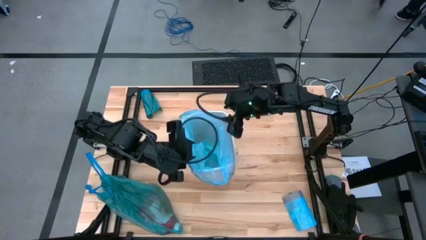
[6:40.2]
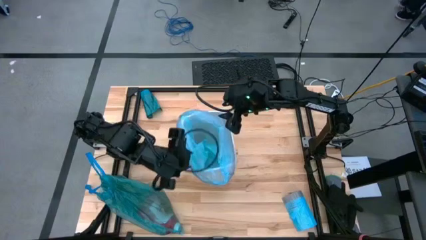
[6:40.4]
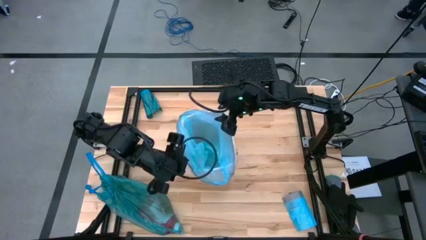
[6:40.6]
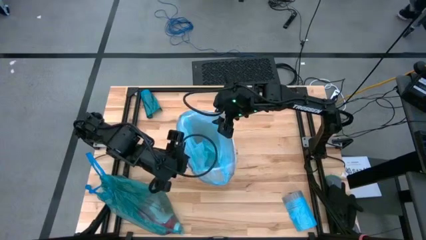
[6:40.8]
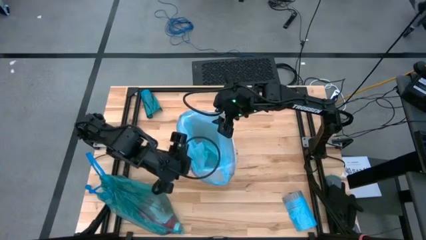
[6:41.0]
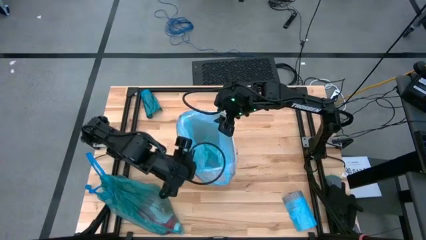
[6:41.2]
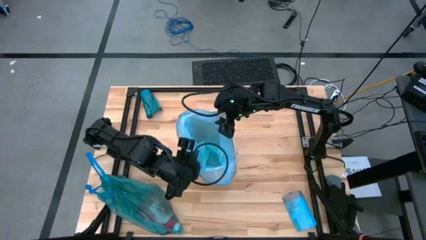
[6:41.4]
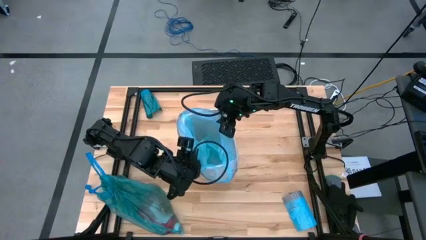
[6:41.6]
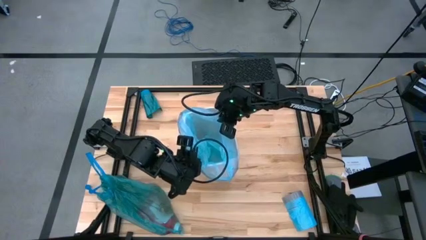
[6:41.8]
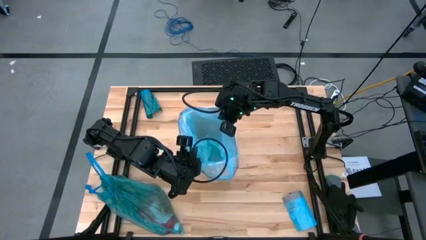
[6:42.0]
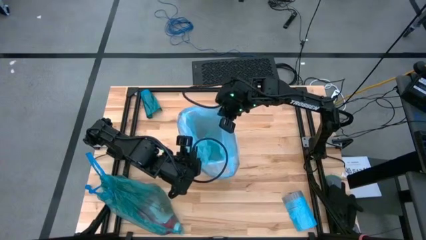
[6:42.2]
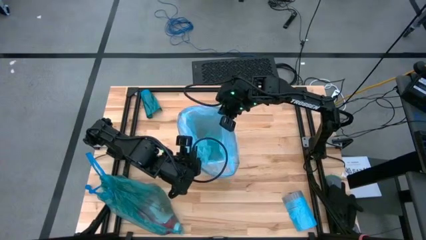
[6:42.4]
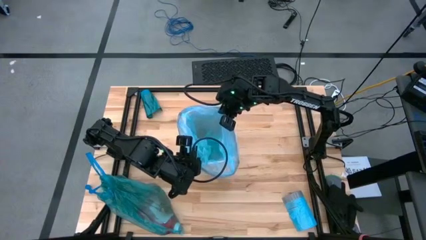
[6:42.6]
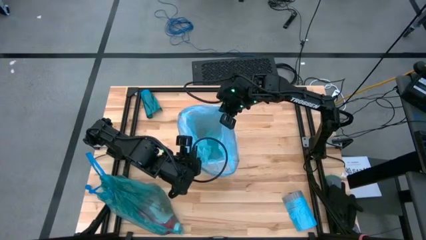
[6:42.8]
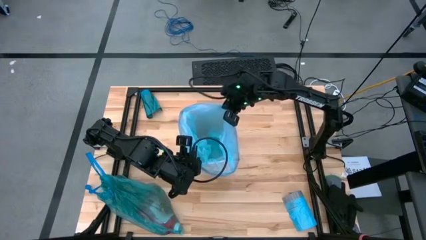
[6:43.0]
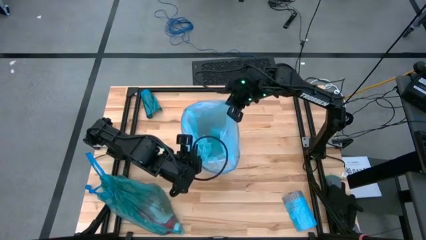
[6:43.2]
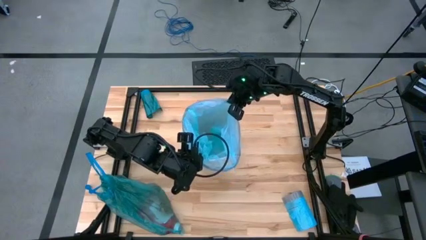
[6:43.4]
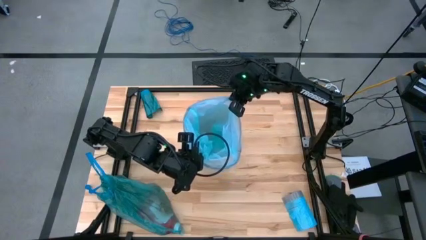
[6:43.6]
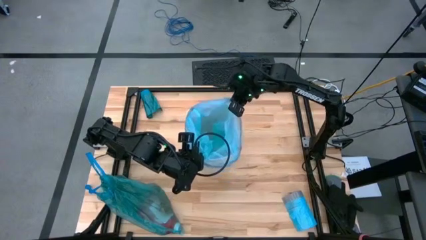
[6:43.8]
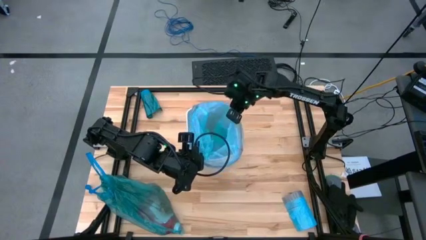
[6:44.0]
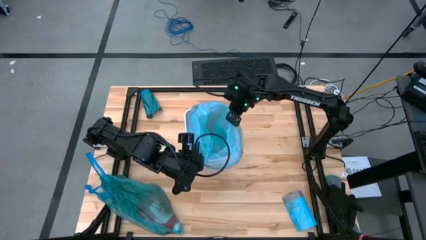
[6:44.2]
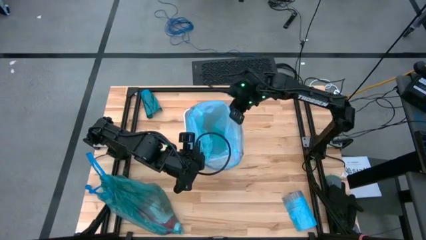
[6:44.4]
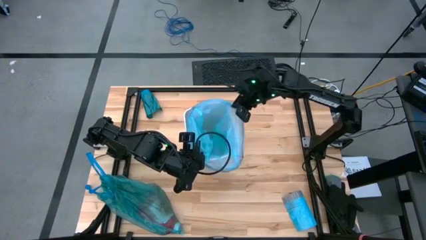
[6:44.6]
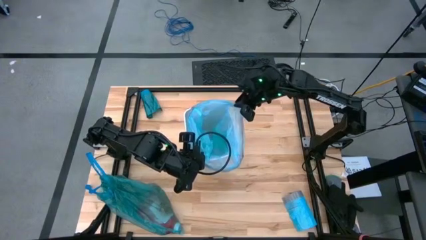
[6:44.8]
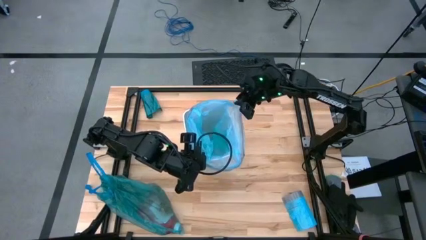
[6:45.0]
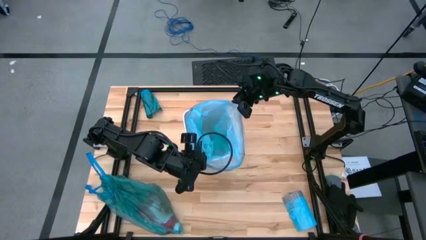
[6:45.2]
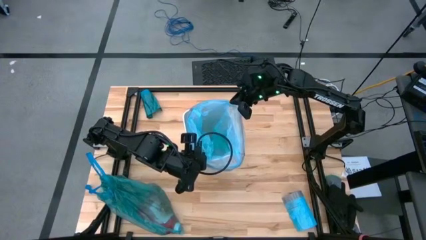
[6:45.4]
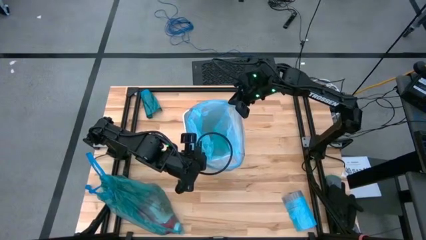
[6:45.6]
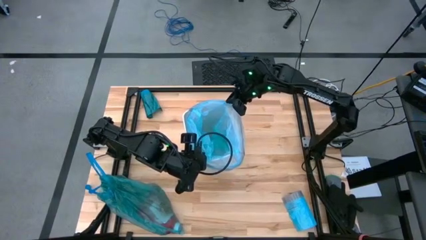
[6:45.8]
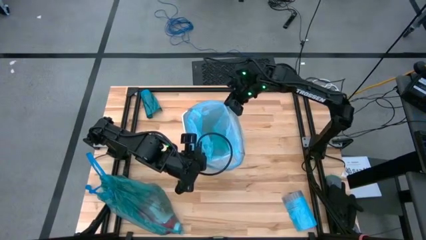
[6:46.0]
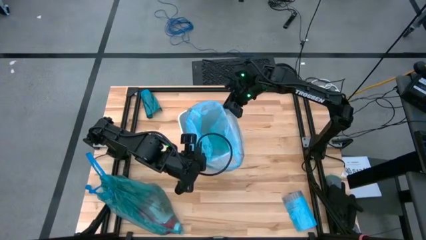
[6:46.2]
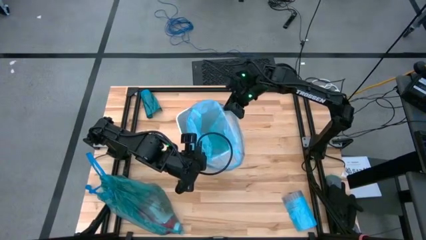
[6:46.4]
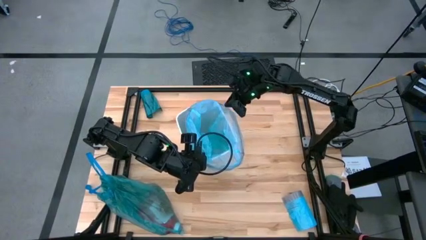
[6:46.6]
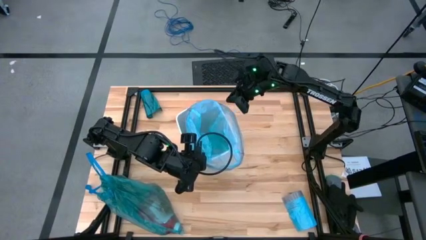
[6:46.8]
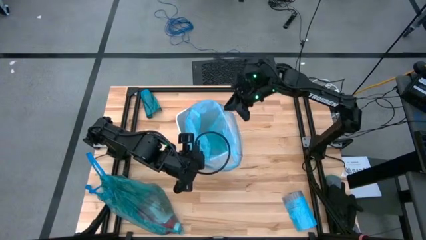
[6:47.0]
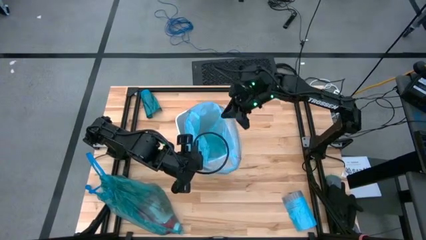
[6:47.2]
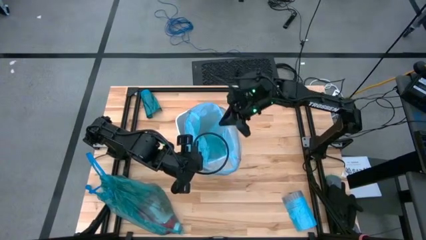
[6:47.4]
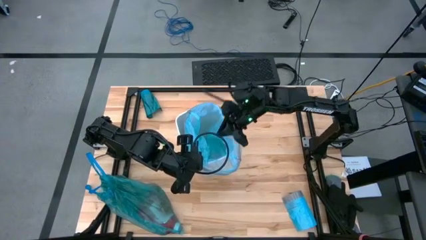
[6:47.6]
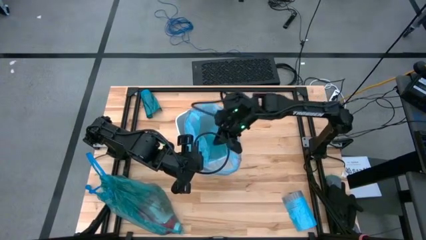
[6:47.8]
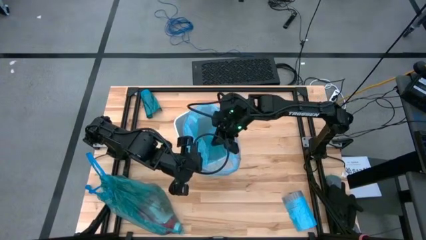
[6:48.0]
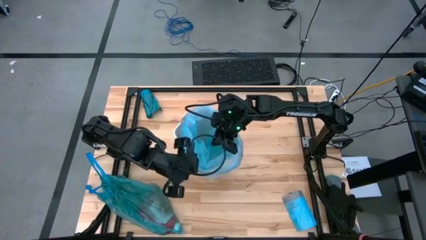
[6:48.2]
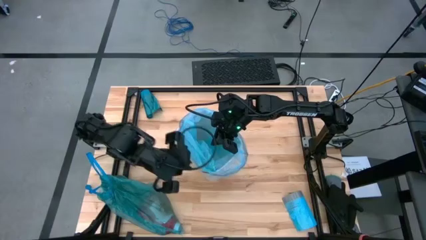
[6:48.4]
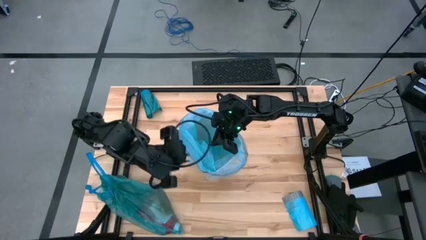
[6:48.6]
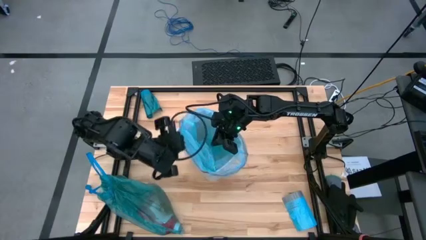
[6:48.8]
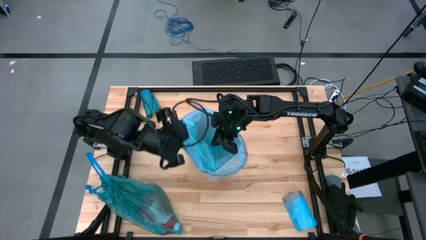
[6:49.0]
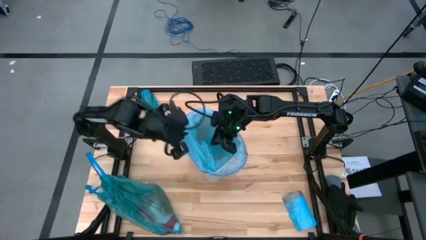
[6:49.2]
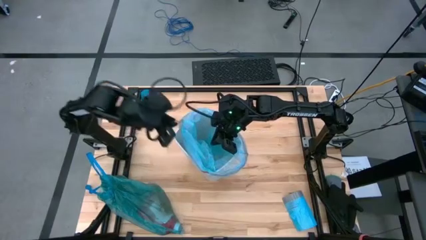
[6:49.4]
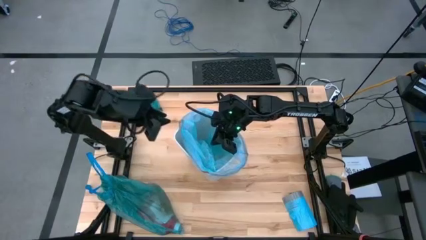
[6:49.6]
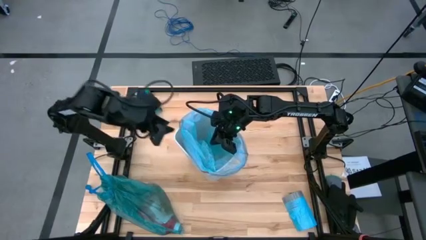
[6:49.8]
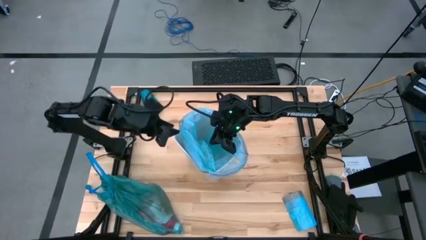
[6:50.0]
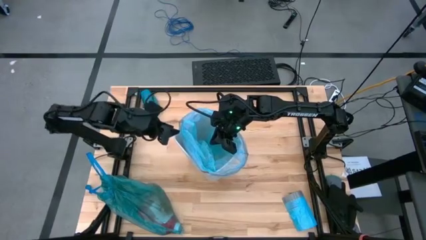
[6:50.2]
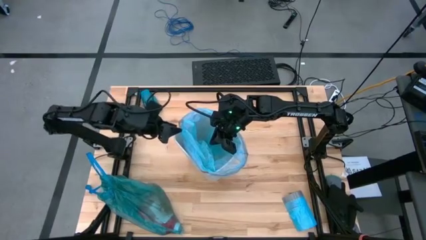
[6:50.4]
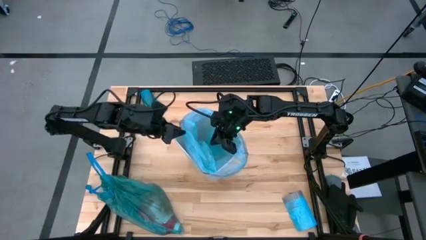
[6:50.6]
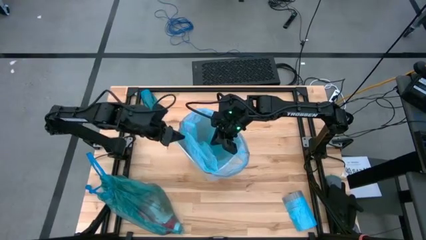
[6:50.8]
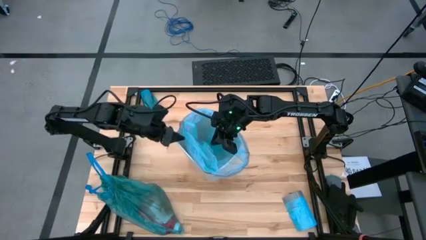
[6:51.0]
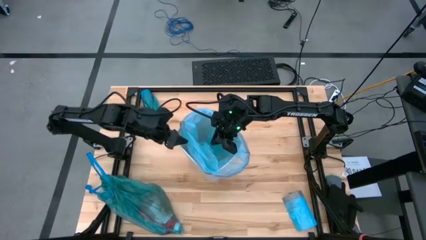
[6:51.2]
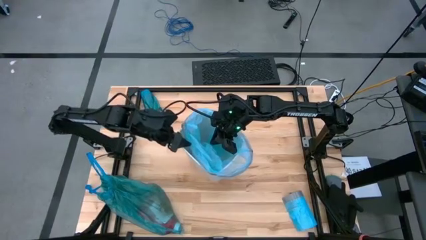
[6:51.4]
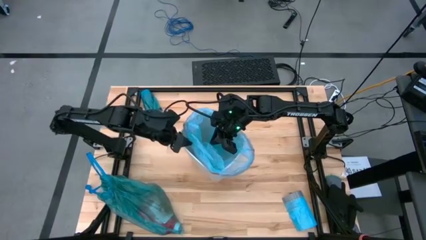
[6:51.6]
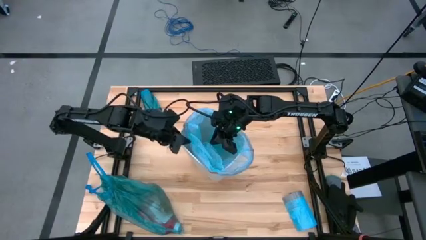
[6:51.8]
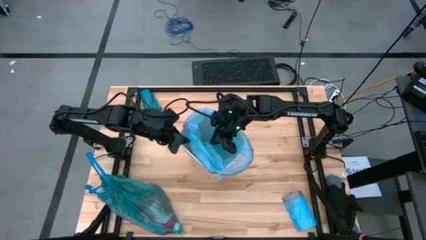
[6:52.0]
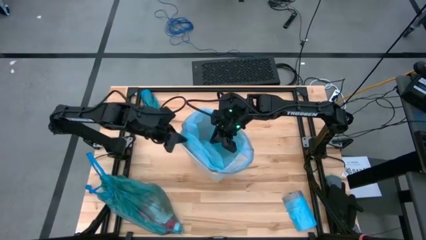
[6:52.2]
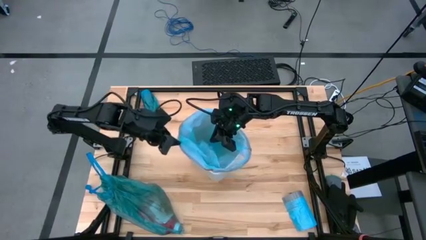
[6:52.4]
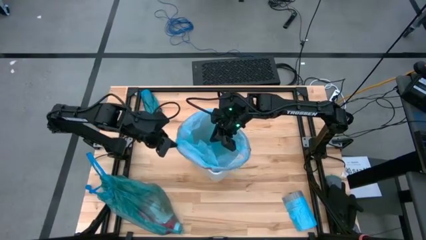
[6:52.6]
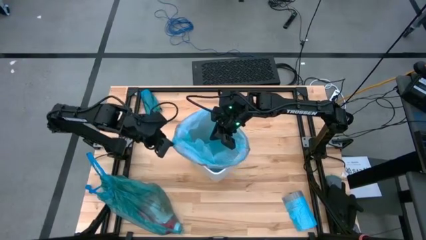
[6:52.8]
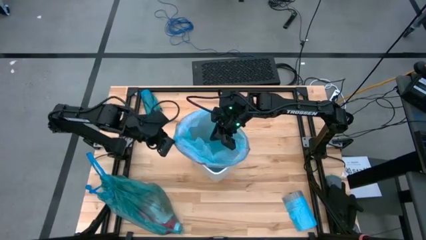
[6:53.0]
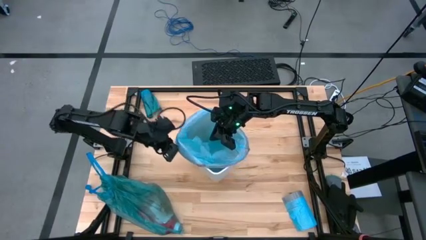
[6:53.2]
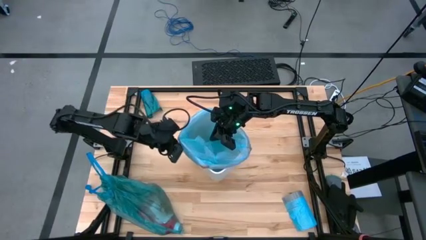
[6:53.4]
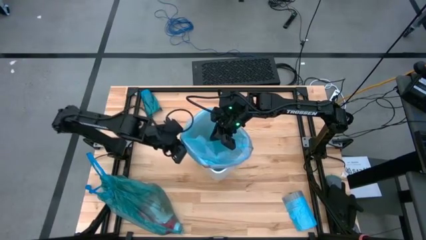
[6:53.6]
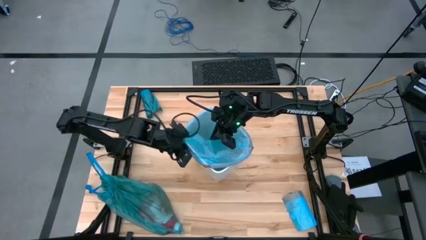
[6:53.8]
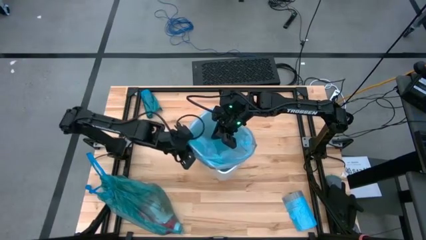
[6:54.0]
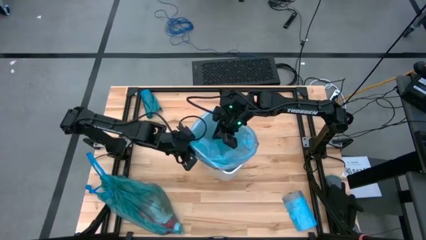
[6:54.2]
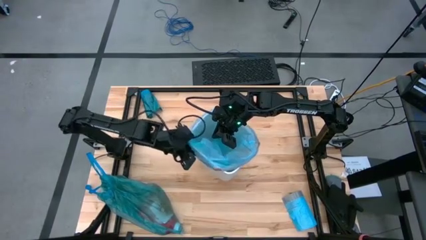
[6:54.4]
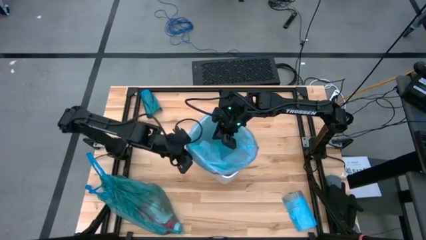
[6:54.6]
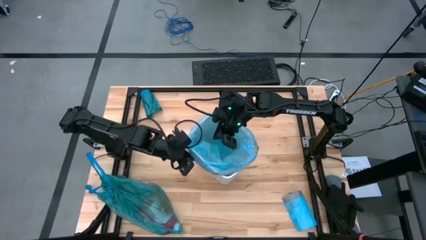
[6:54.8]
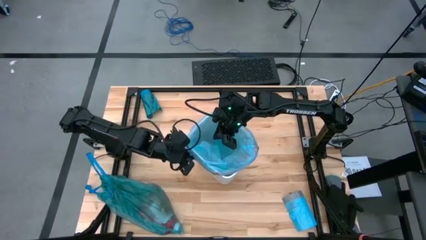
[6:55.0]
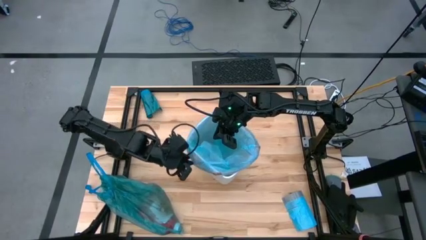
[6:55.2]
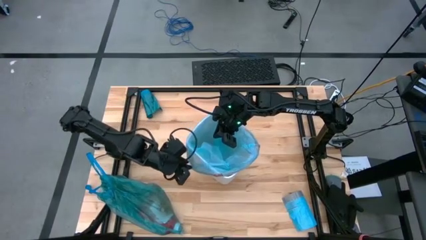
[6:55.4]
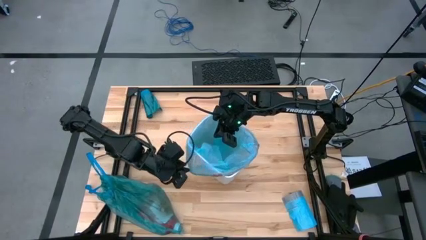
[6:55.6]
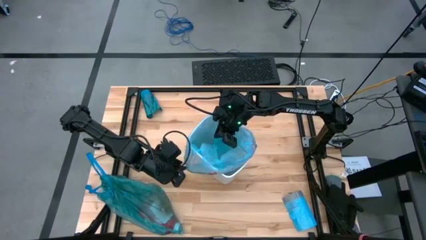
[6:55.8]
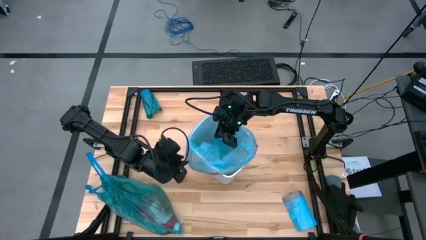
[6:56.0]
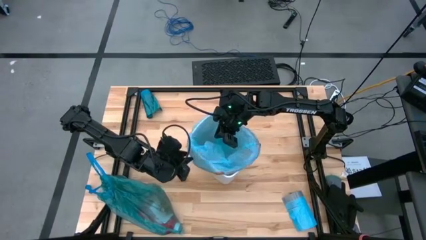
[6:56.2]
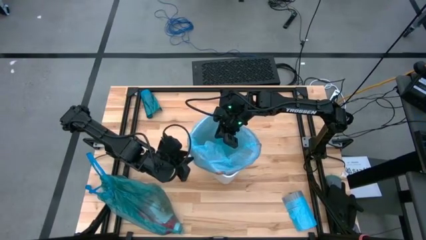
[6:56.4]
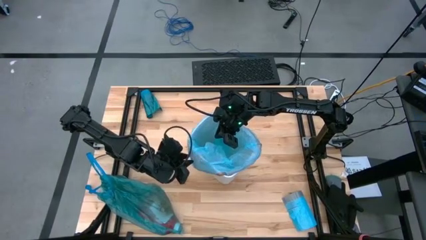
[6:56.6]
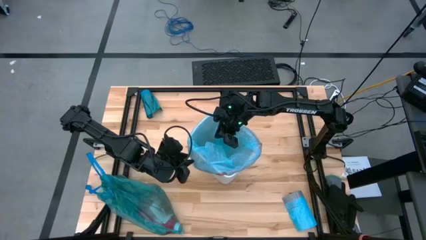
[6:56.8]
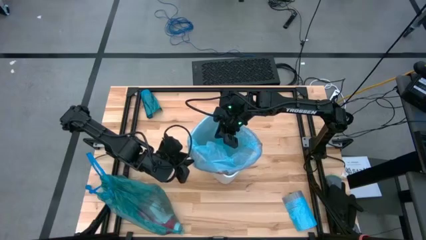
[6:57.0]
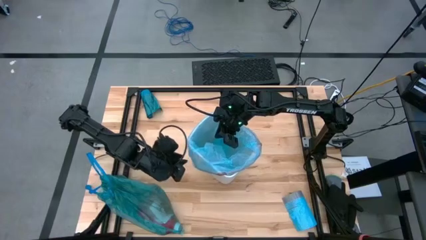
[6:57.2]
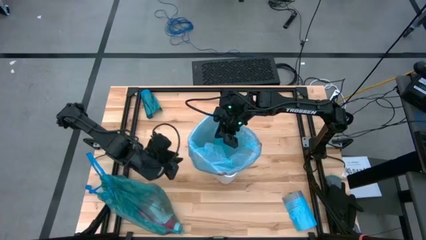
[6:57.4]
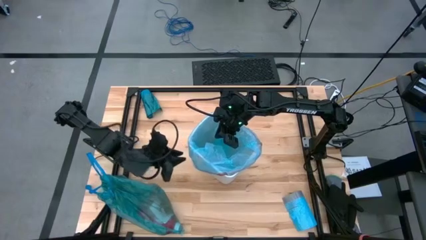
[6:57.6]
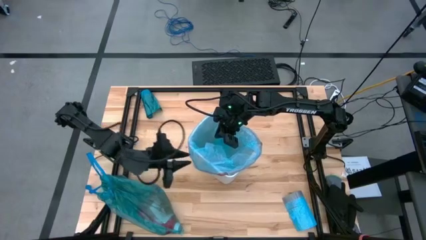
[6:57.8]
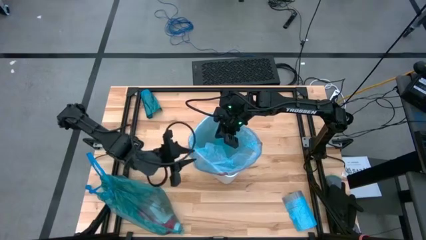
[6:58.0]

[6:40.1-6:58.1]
Task: place trash/remove bag and relplace
Insert the new blue trash bag into the white trash bin
